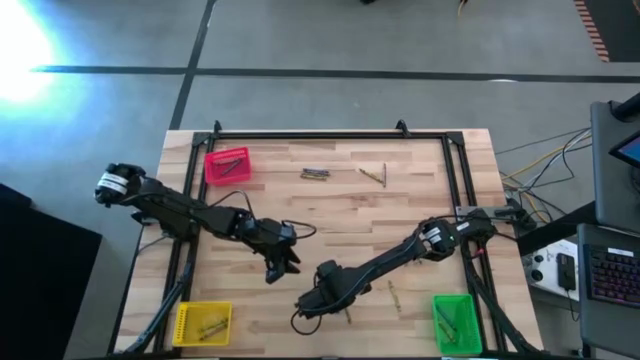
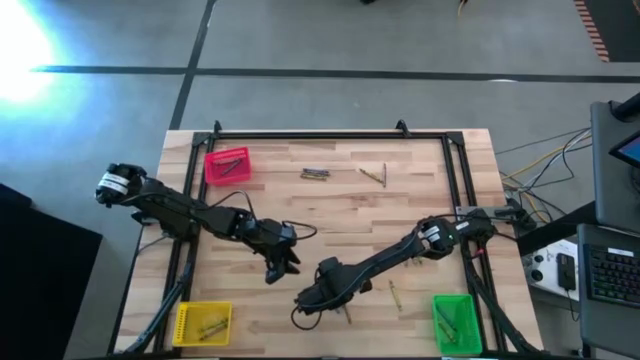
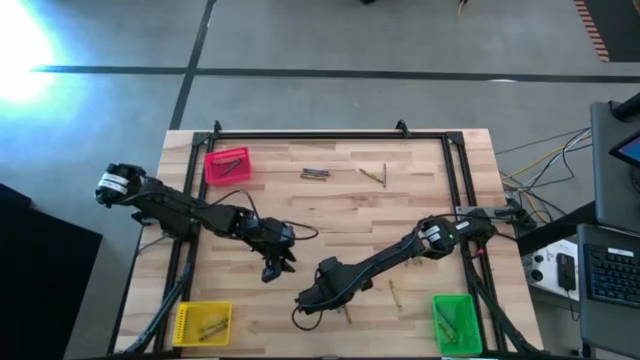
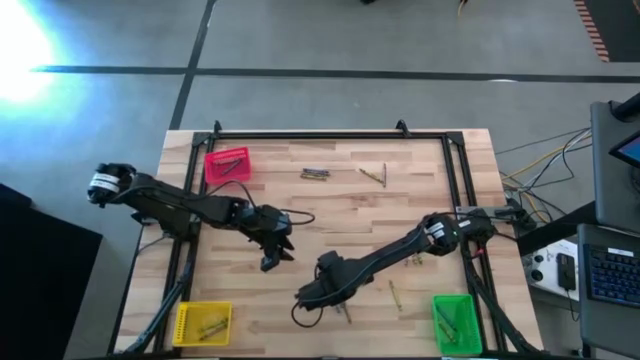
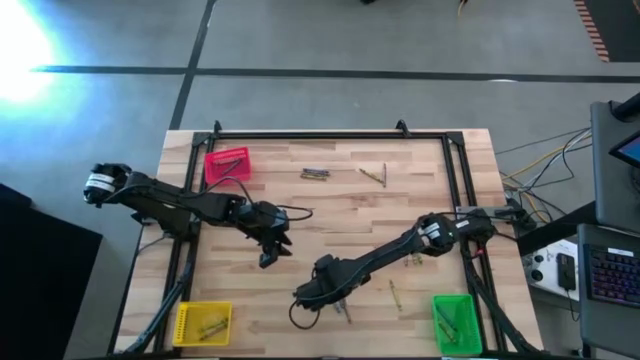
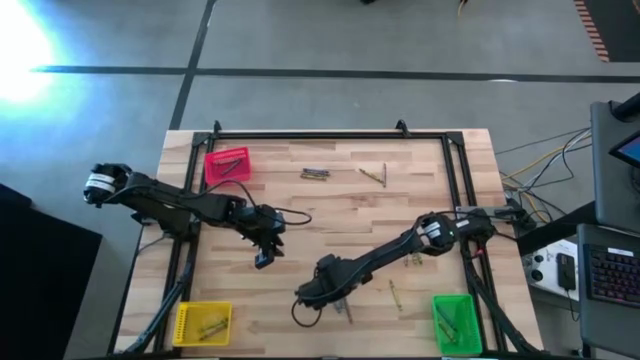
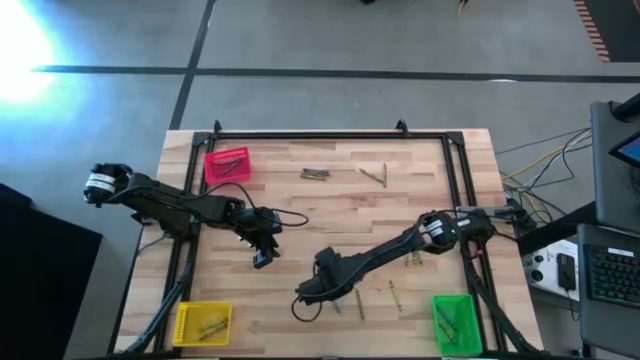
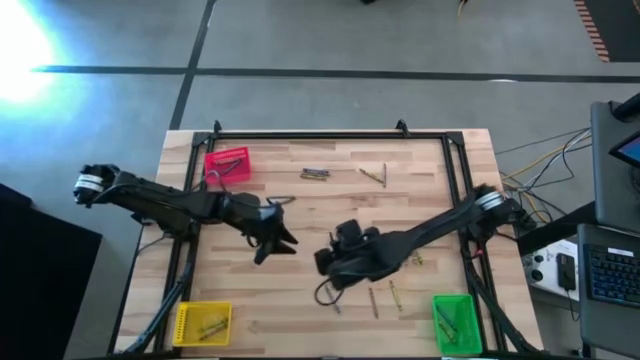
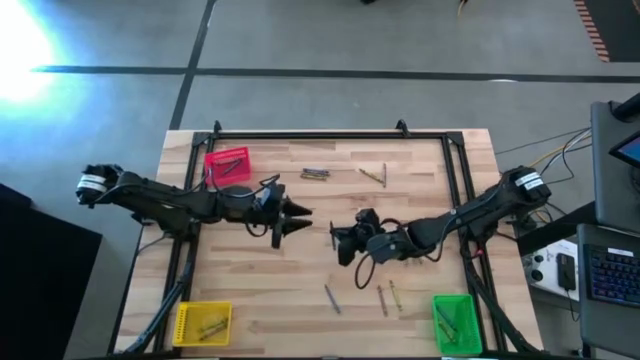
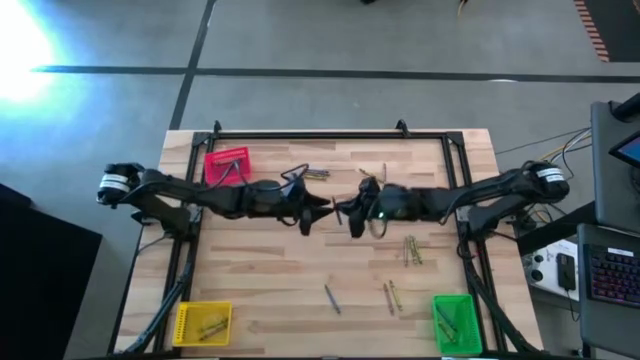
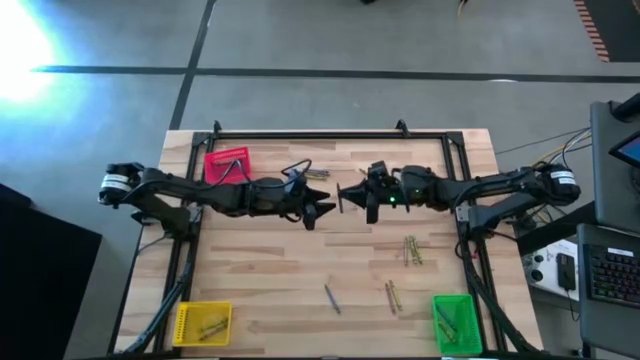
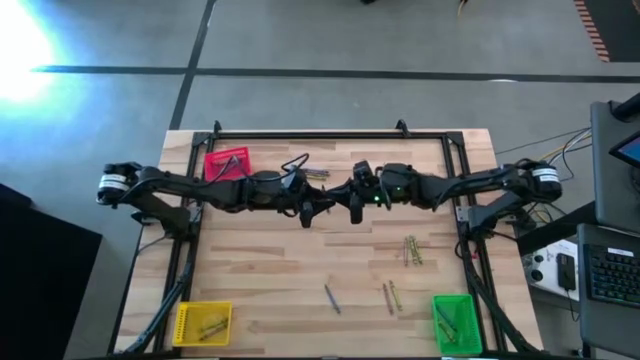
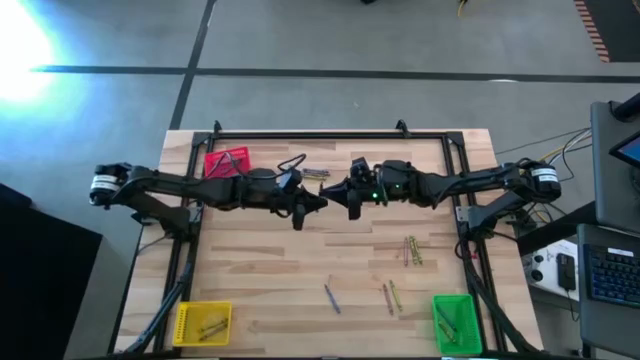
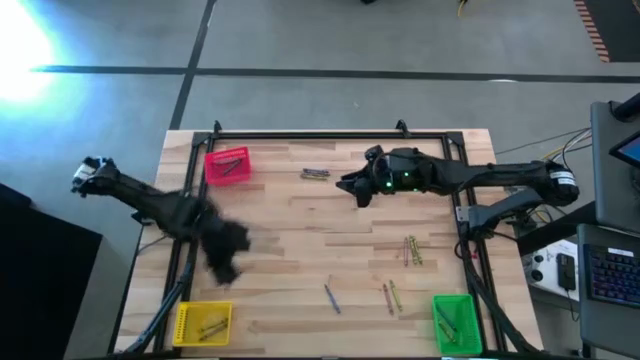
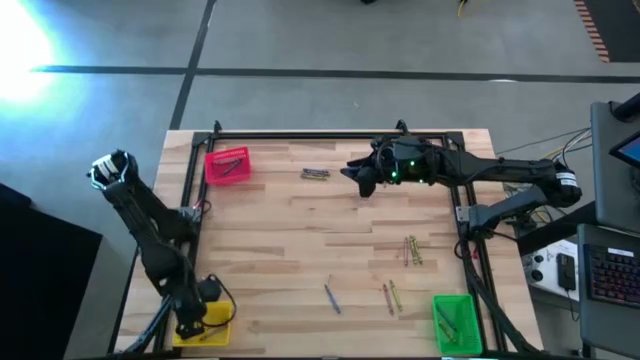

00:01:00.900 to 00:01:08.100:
Task: Sort crayons
Put the blue crayon into the yellow bin

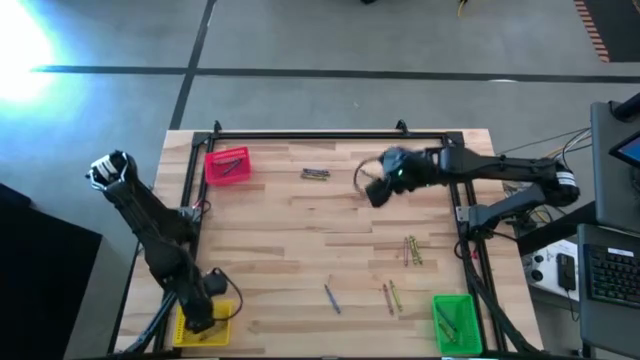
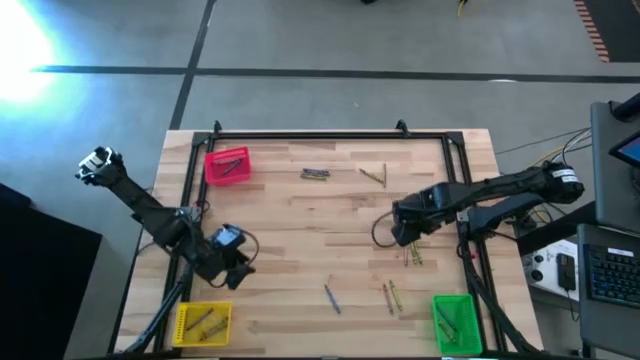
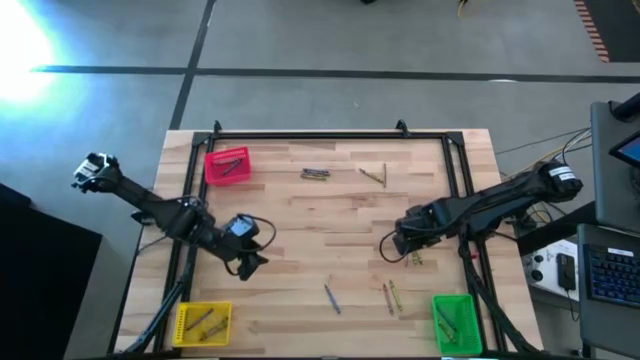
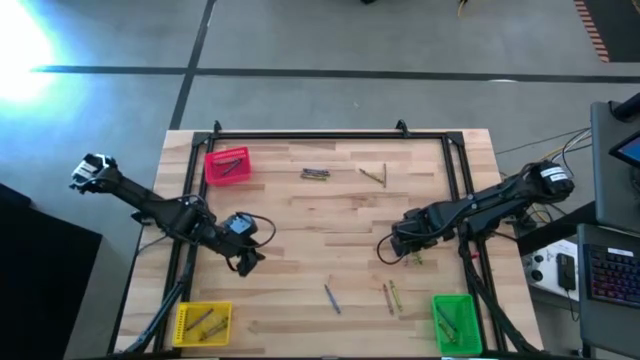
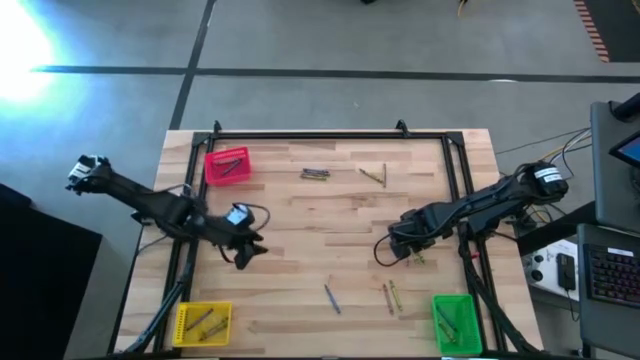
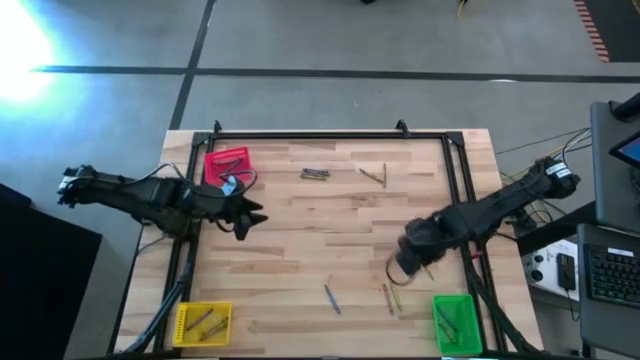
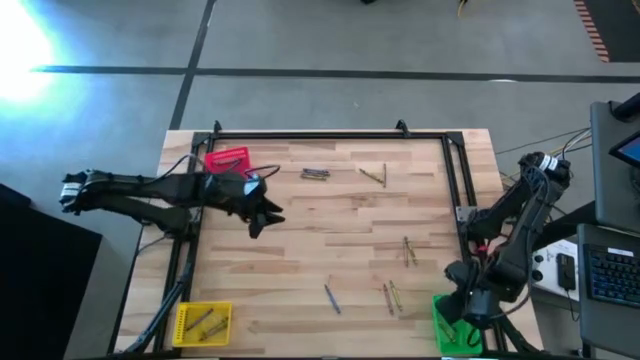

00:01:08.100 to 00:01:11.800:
Put the green crayon into the green bin

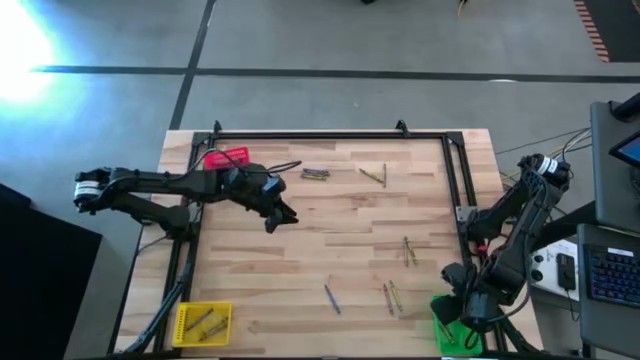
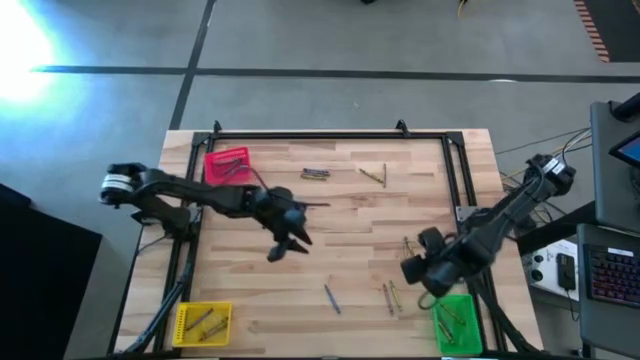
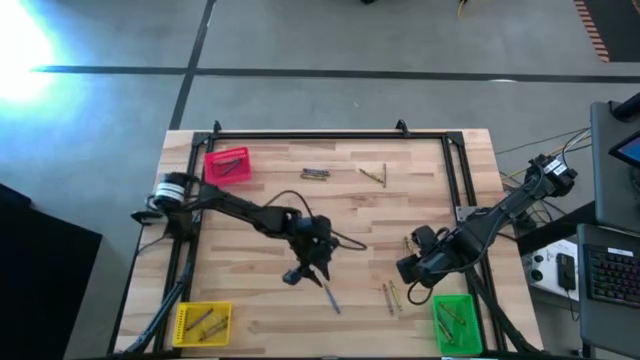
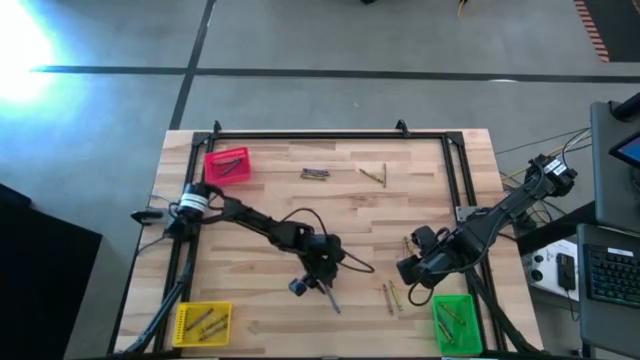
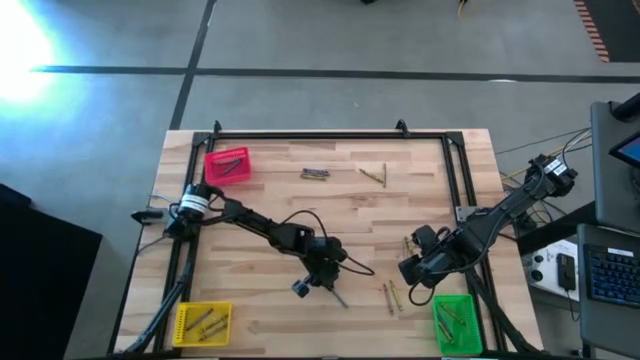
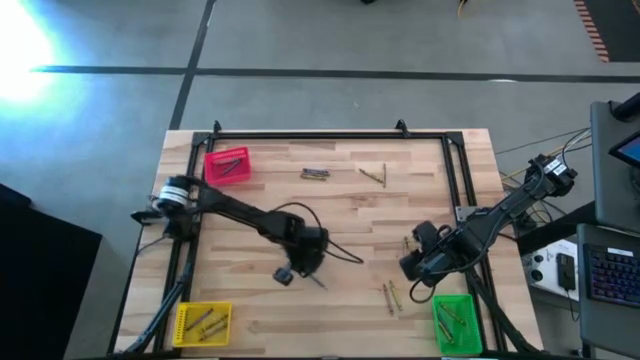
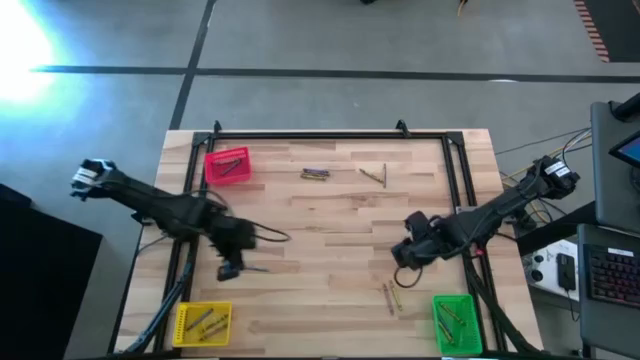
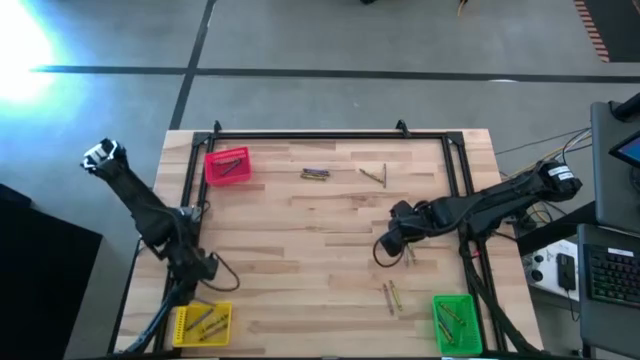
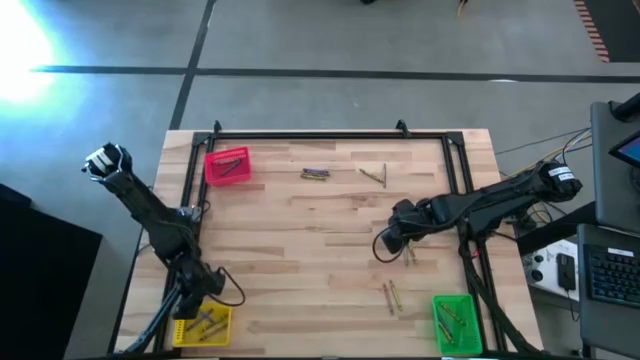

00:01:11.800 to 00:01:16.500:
Put the blue crayon into the yellow bin

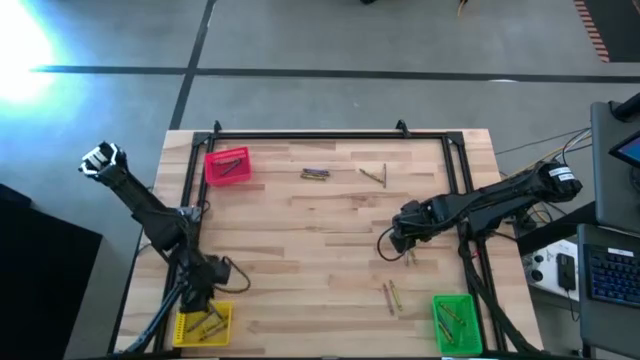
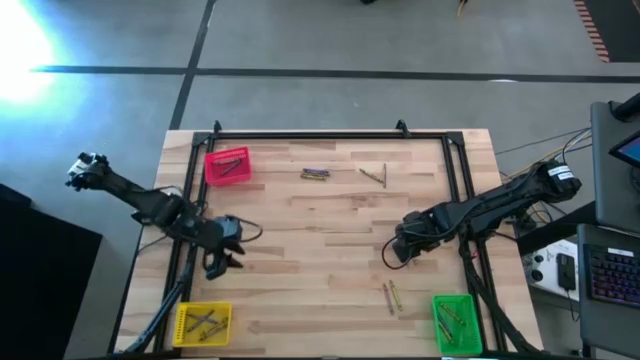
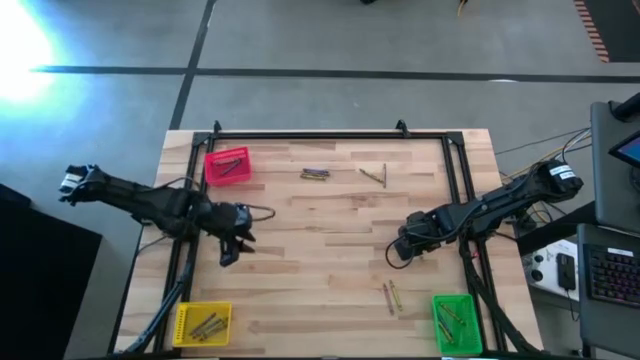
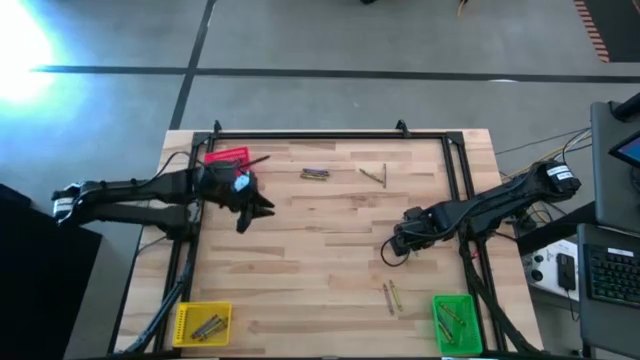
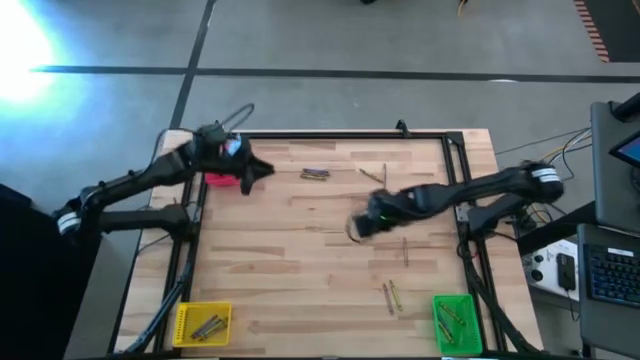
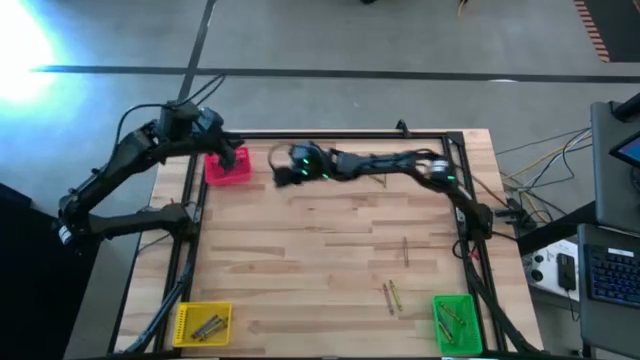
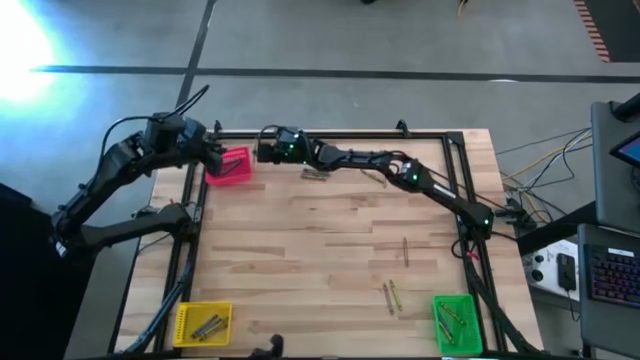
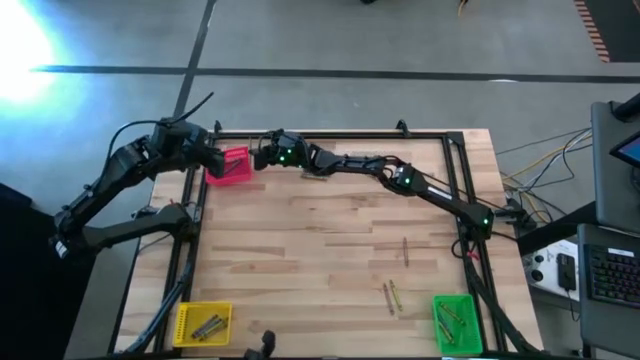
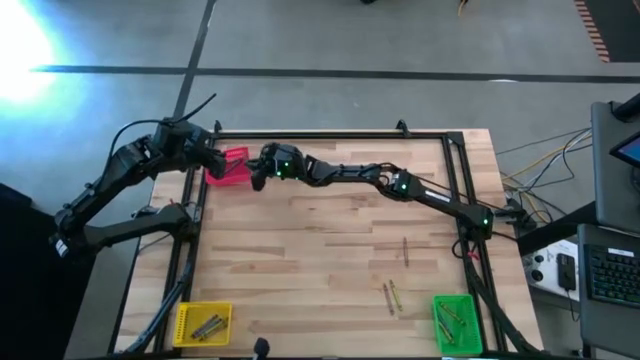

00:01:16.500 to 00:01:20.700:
Put the green crayon into the red bin

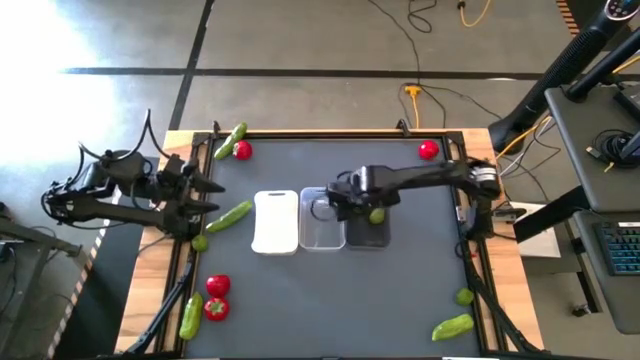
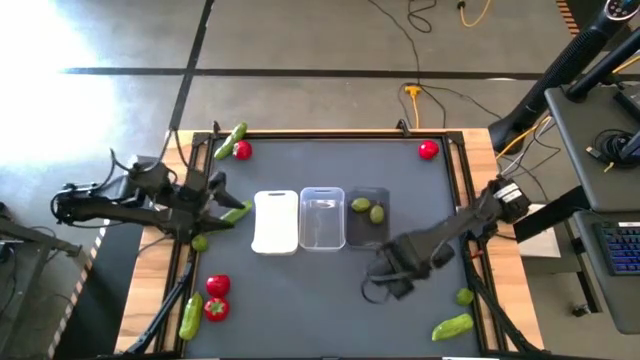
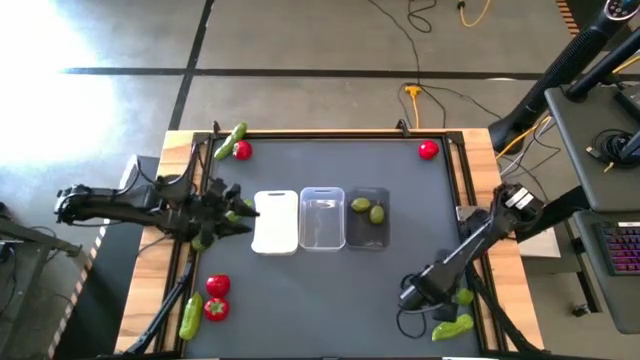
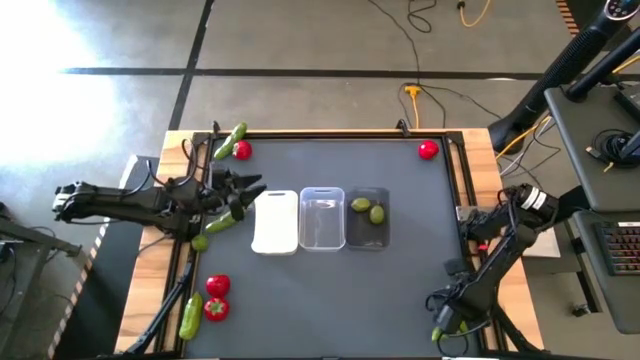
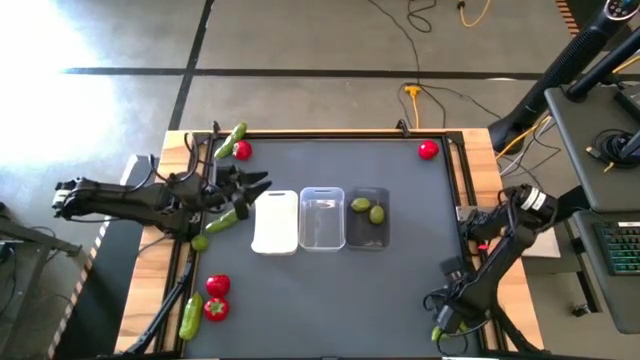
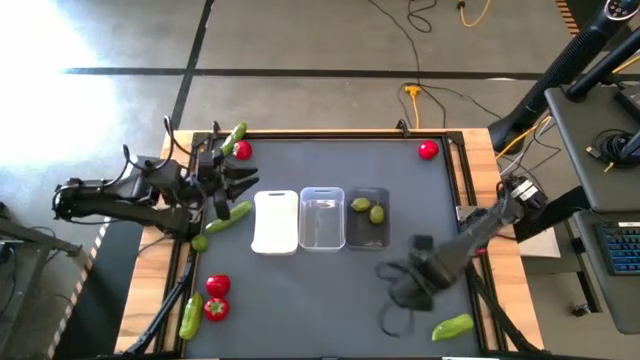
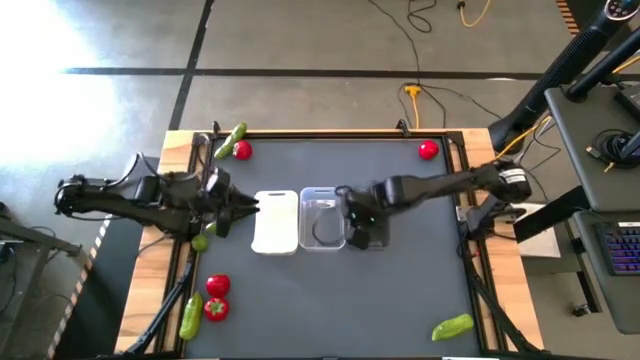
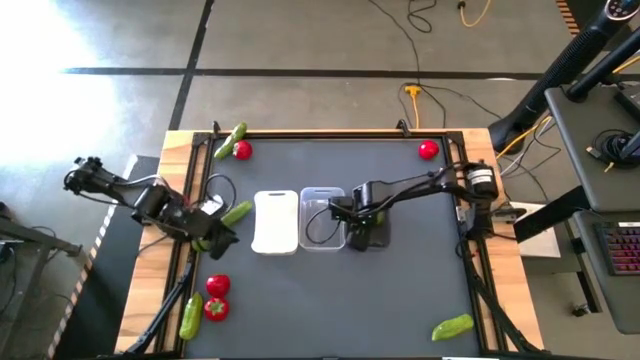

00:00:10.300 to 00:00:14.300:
Task: Sort produce into baskets
Put the green lime into the black bin
